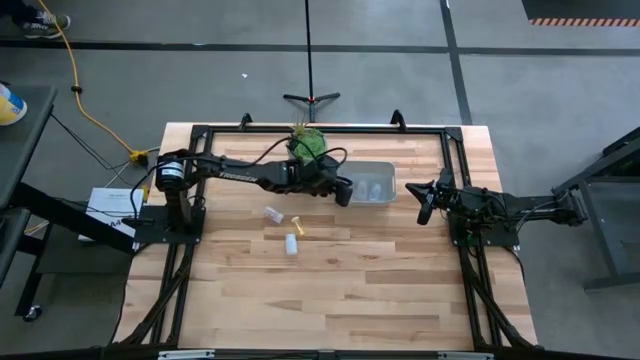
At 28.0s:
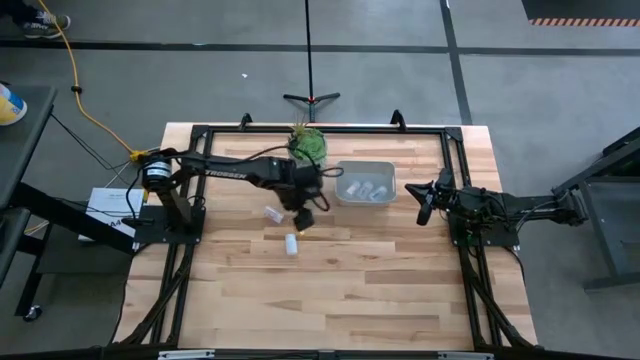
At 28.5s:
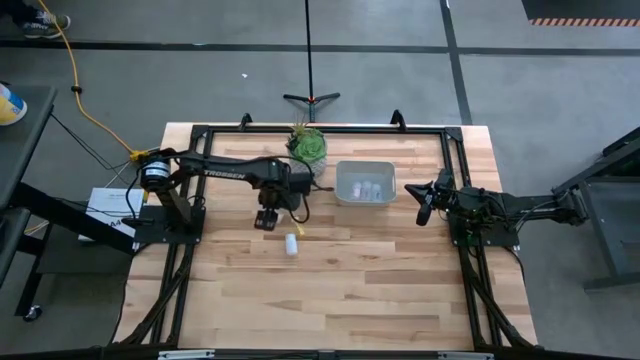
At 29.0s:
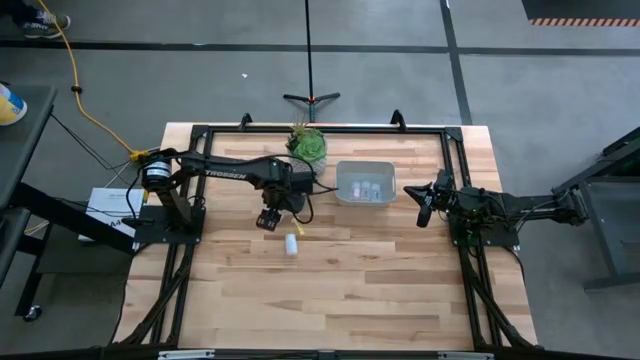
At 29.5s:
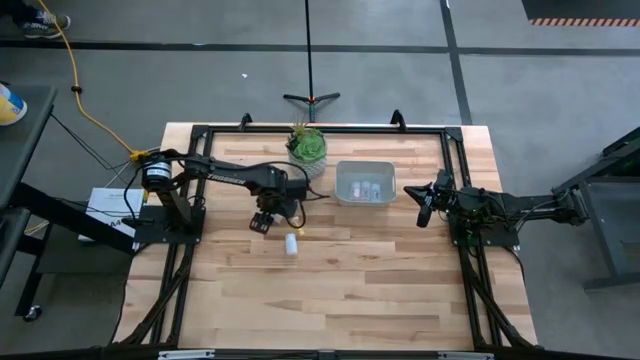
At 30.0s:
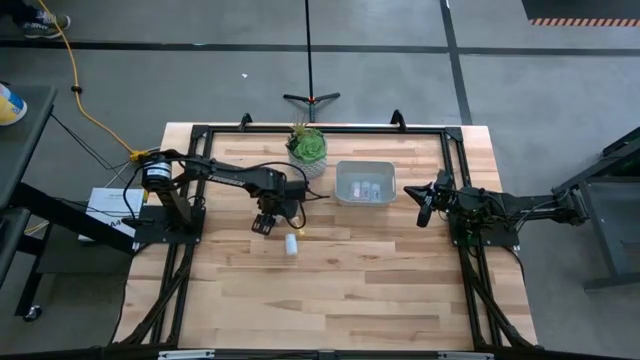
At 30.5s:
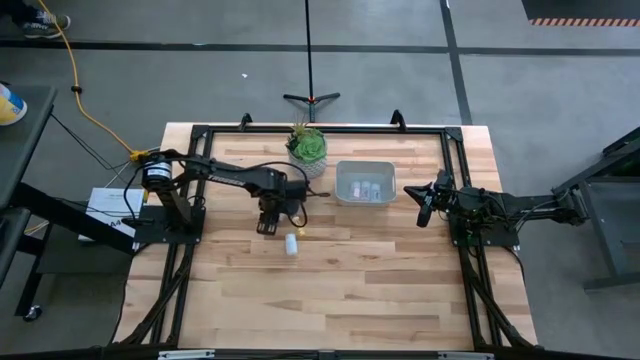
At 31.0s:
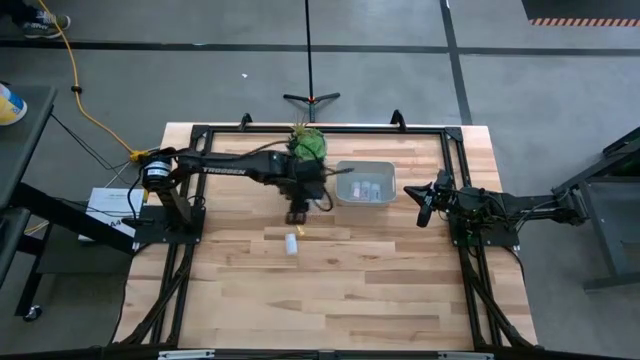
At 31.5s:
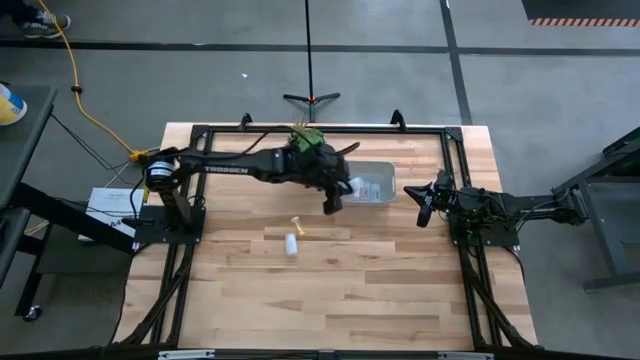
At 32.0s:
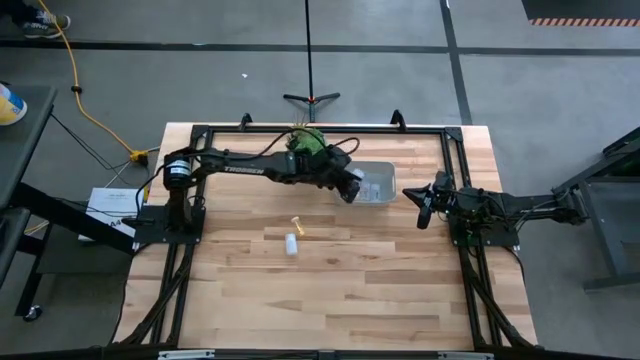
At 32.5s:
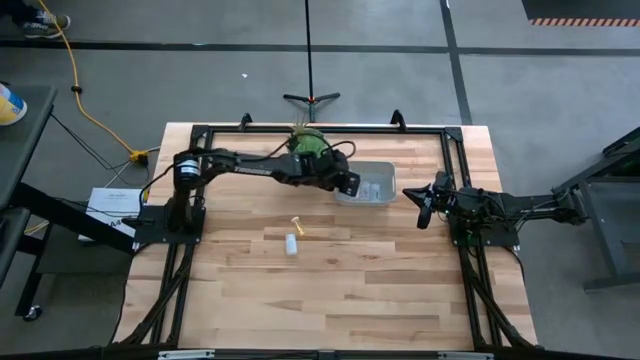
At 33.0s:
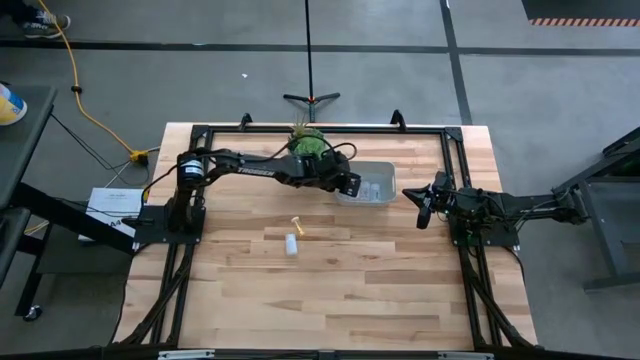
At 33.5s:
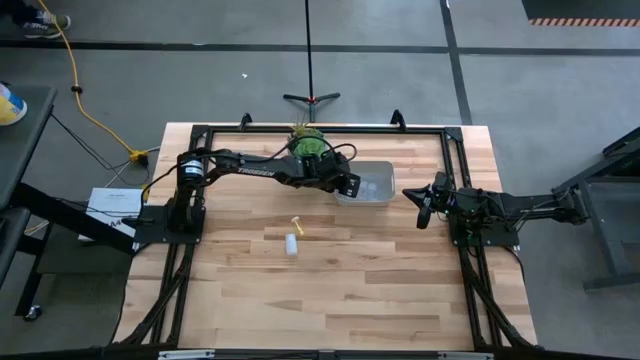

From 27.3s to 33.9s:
Task: Pick and place pill bottles into a basket
Put the transparent medicine bottle into the gray bin

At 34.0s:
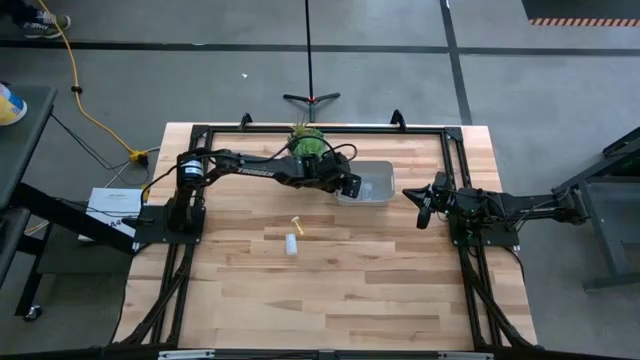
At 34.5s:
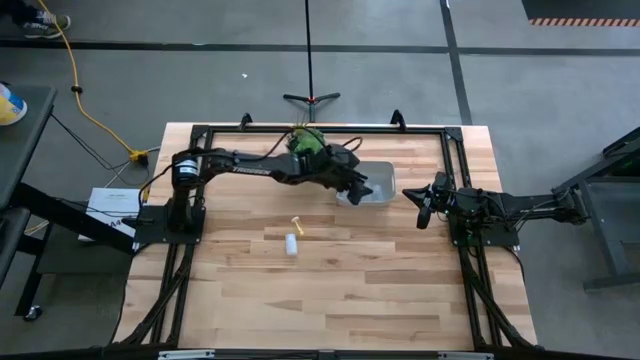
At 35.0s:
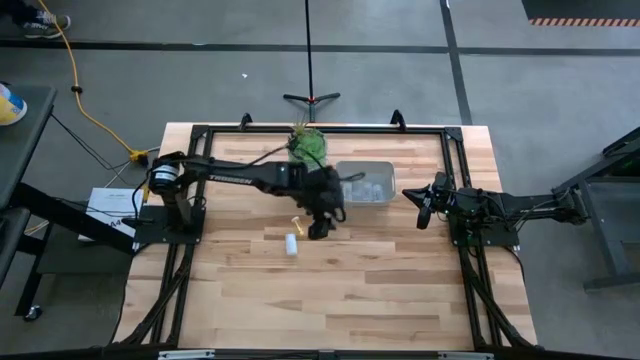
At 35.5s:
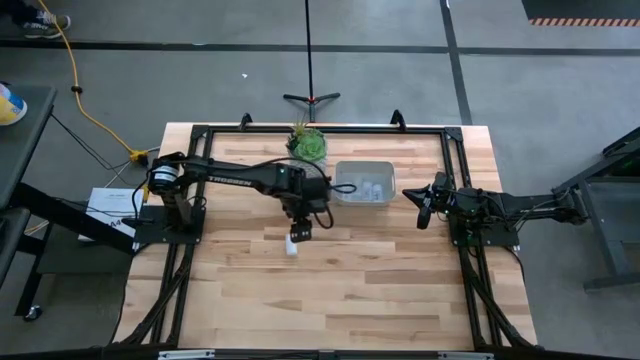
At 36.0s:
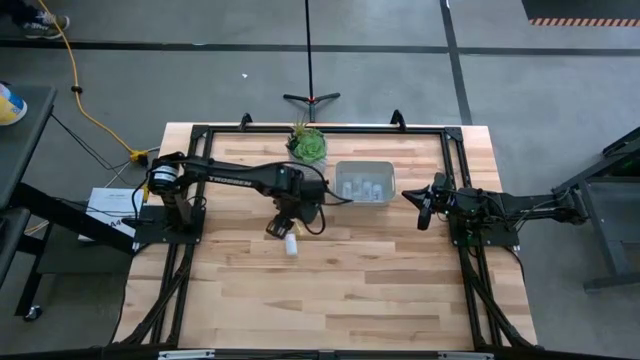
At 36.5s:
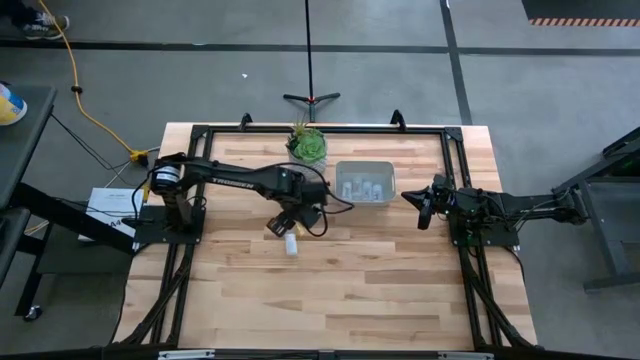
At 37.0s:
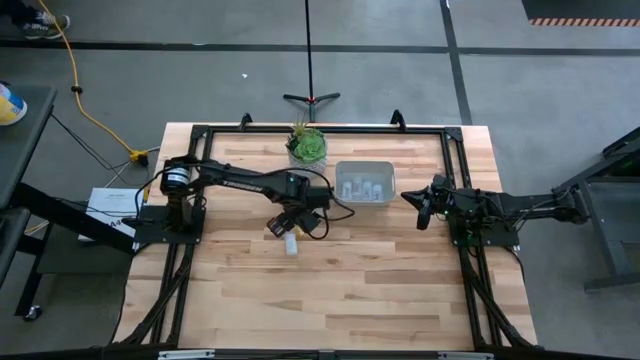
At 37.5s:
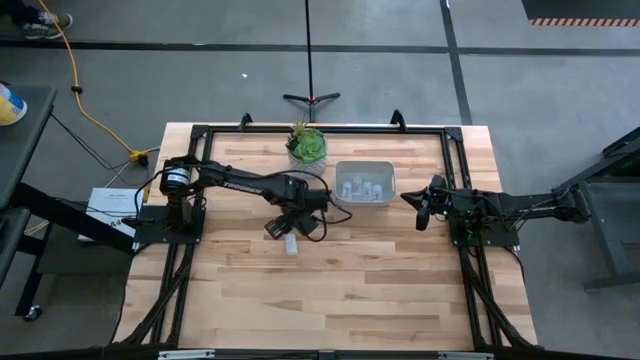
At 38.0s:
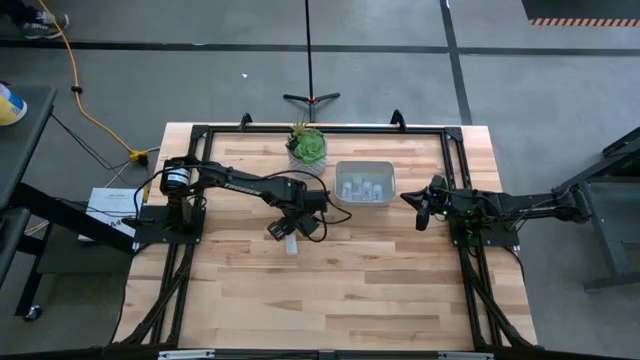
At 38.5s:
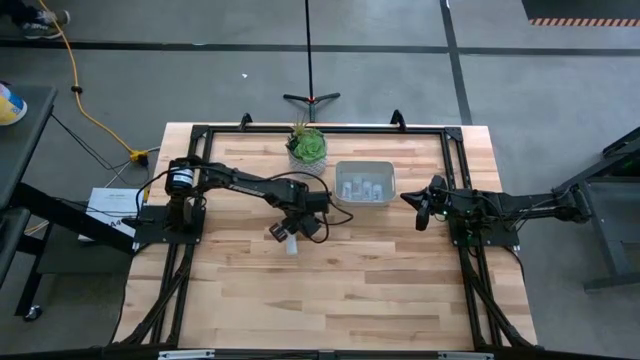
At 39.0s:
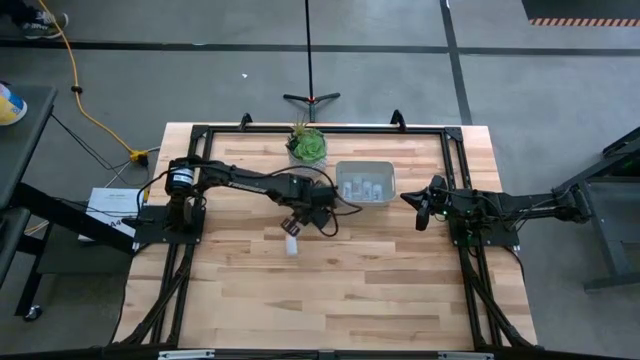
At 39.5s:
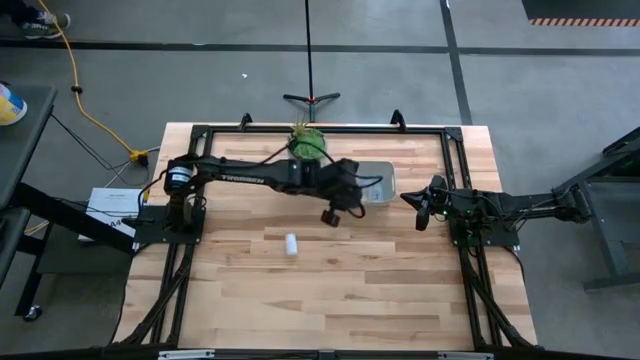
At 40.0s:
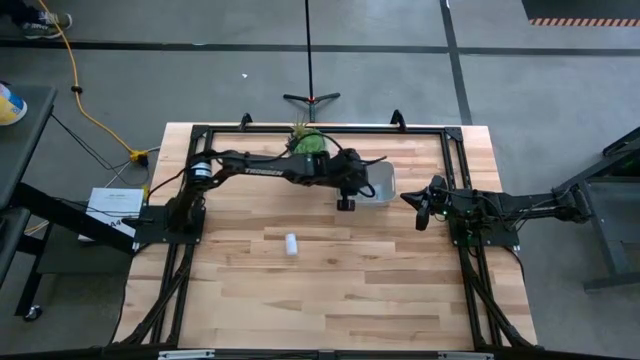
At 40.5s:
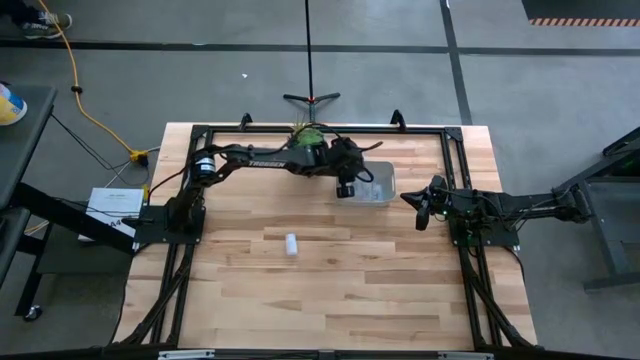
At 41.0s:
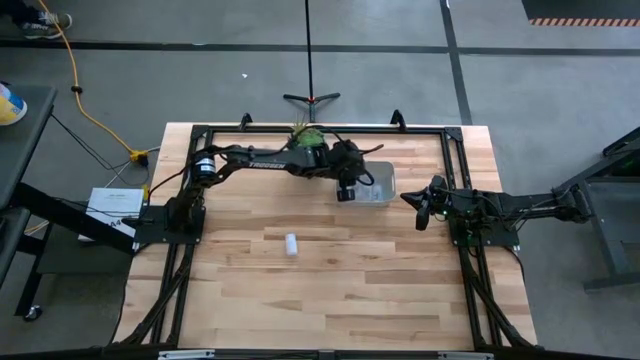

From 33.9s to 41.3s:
Put the yellow medicine bottle into the gray bin

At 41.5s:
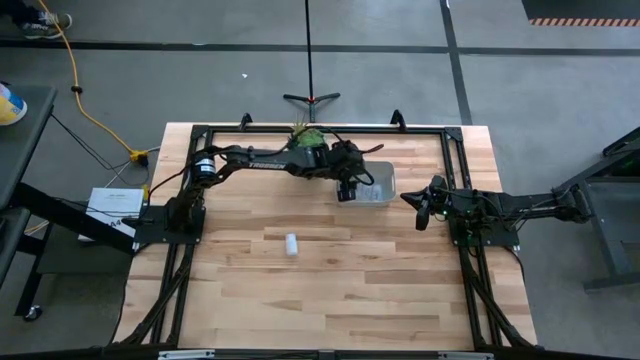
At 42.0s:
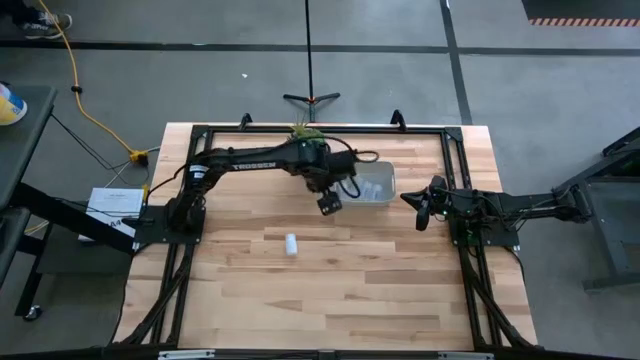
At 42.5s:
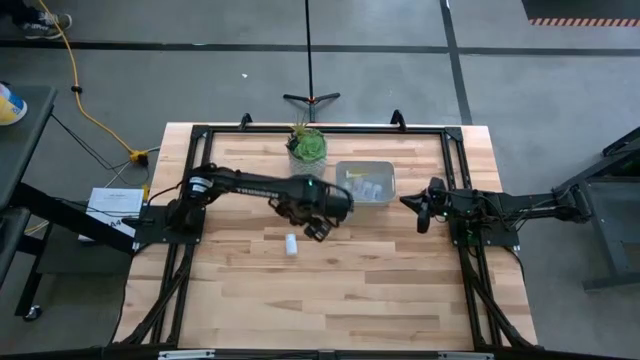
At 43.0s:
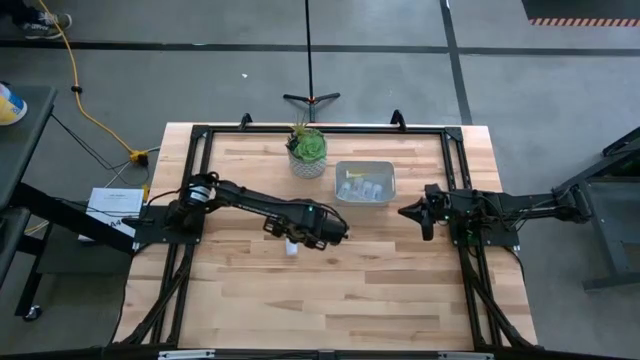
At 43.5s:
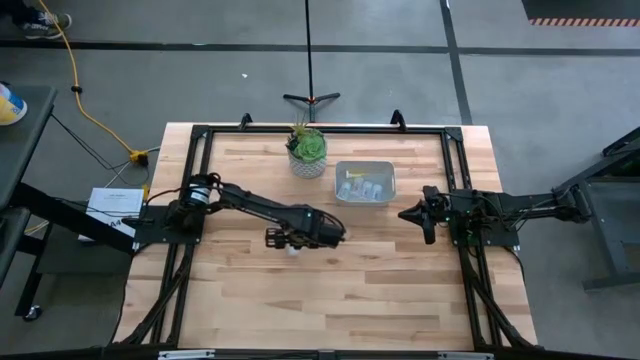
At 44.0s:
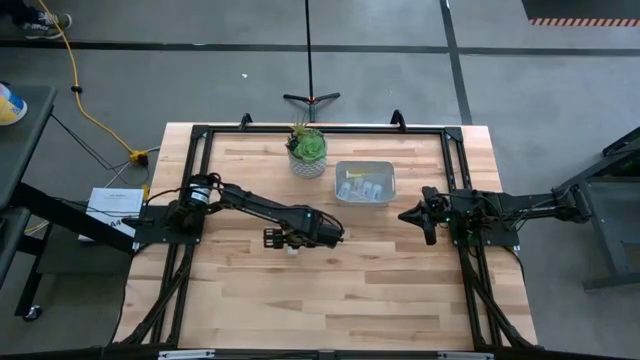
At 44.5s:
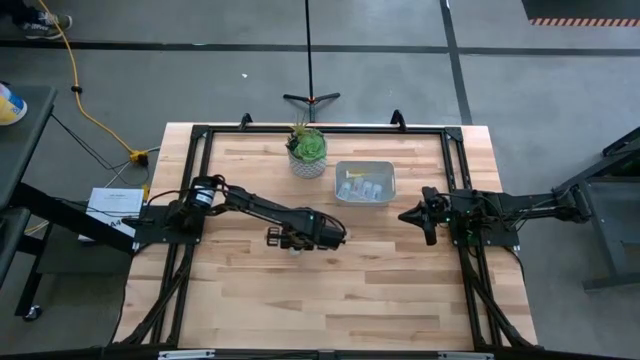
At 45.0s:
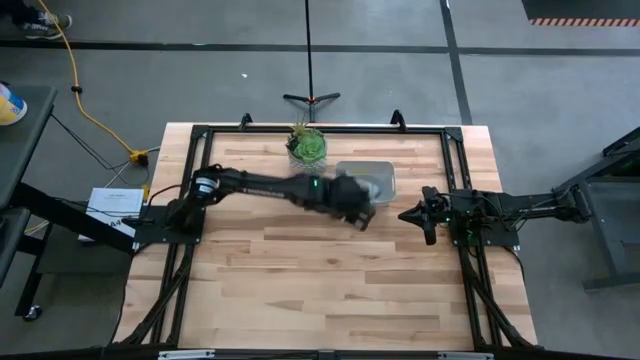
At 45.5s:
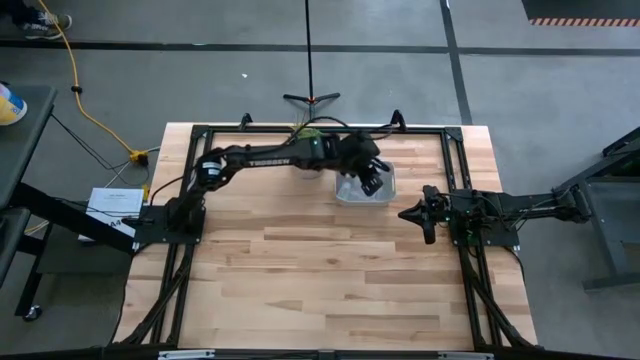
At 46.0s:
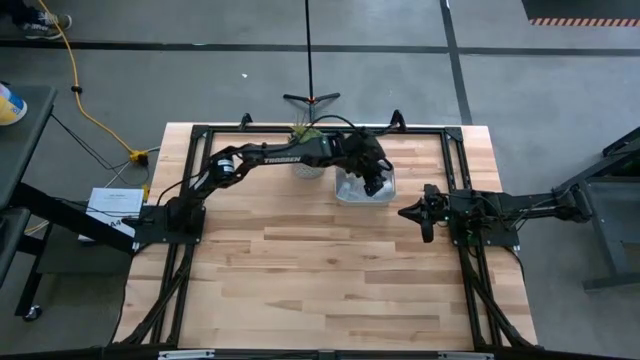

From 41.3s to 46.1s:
Put the white medicine bottle into the gray bin

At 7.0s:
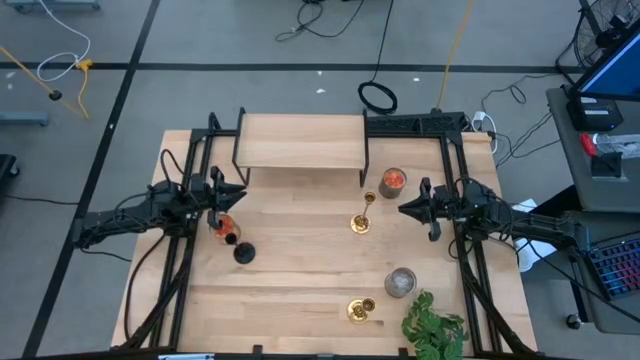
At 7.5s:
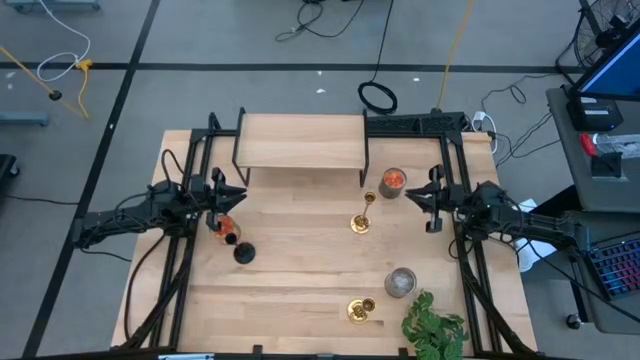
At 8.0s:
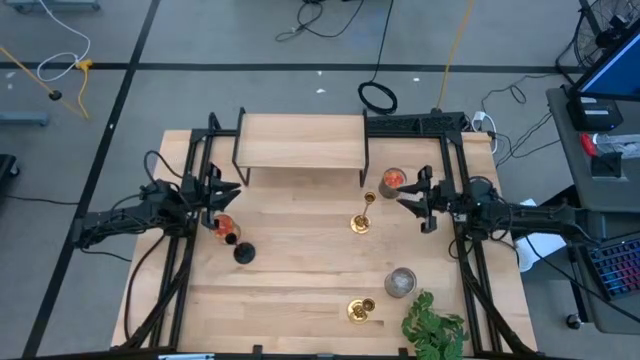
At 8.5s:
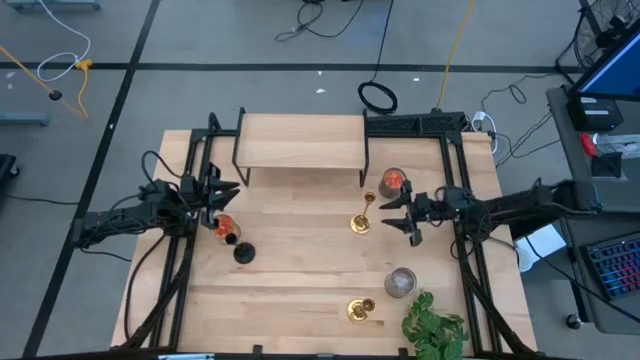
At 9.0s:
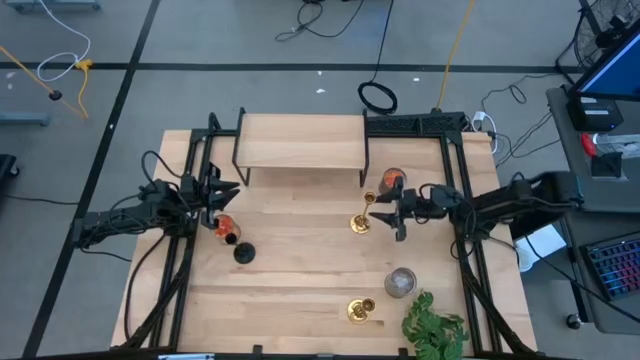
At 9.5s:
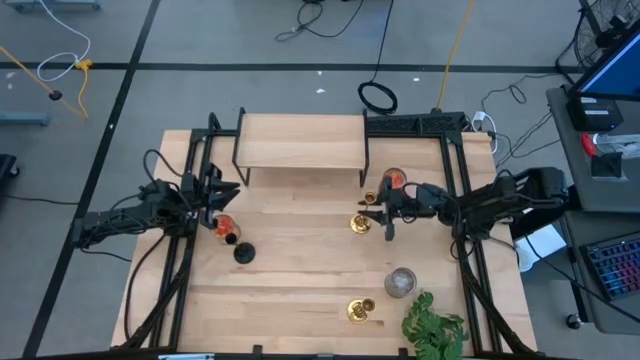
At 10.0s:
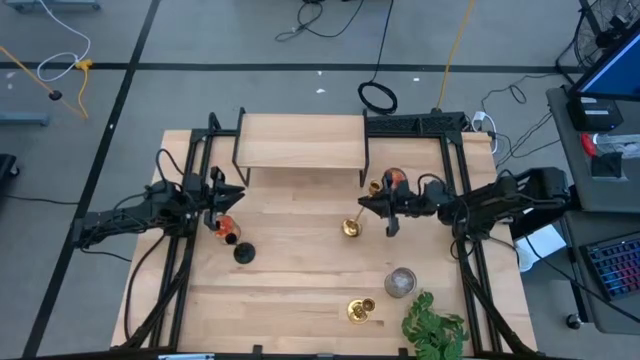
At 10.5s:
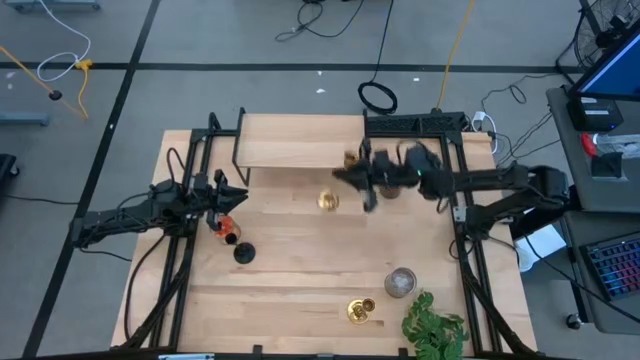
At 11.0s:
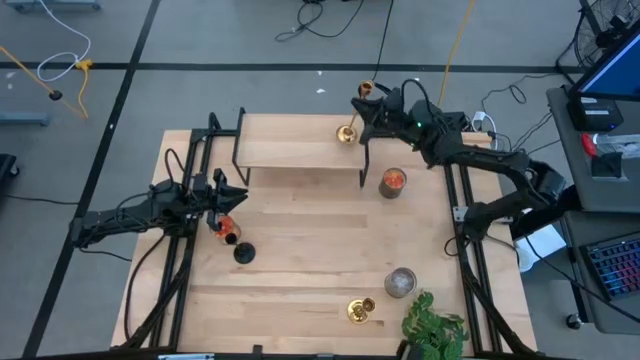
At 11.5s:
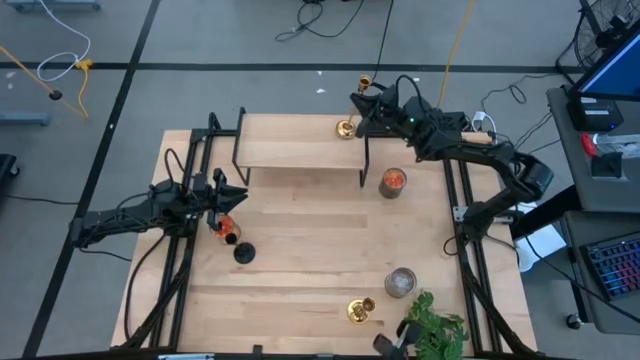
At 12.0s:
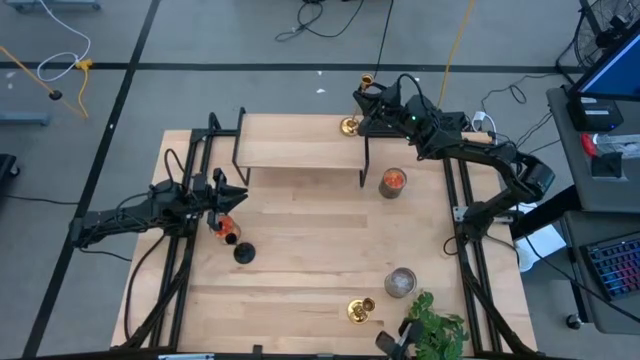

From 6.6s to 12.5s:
Task: Pick & Place candle stick holders
Put the top gold candle holder on the shelf
